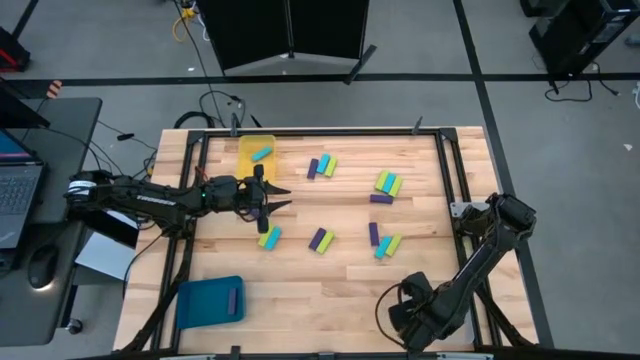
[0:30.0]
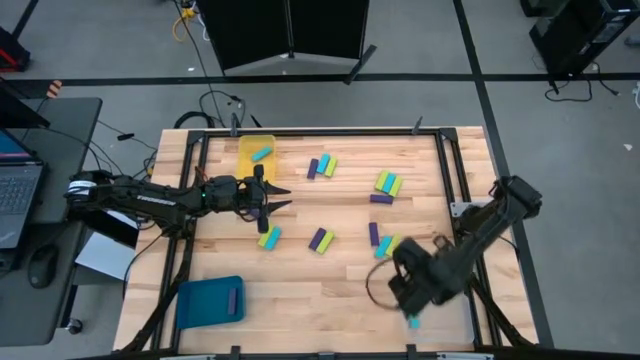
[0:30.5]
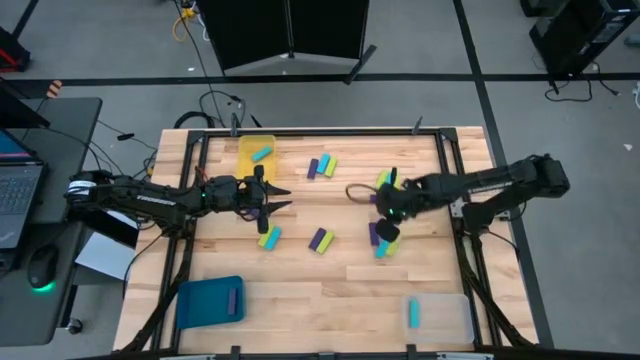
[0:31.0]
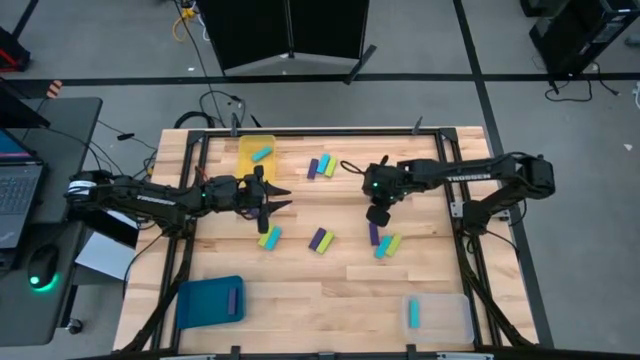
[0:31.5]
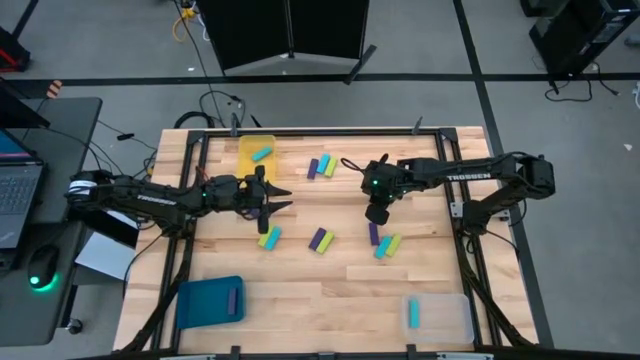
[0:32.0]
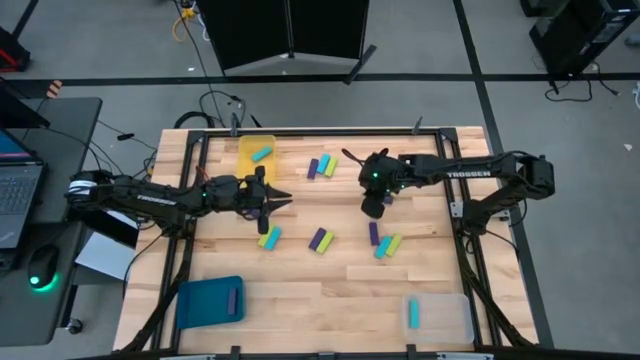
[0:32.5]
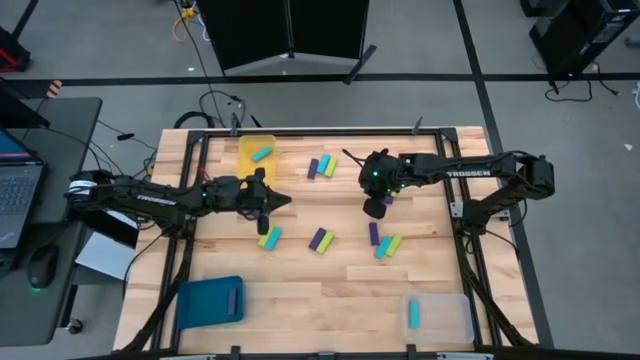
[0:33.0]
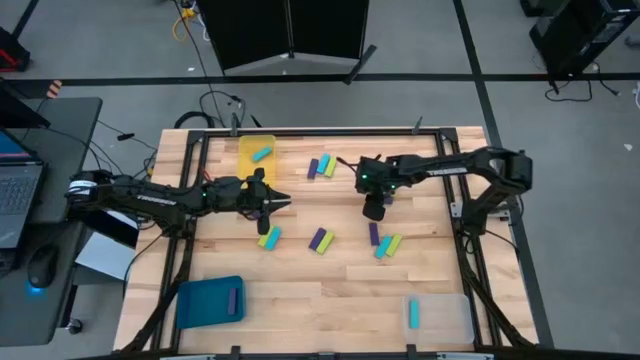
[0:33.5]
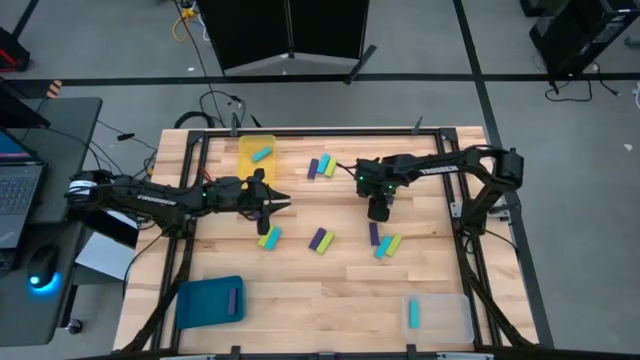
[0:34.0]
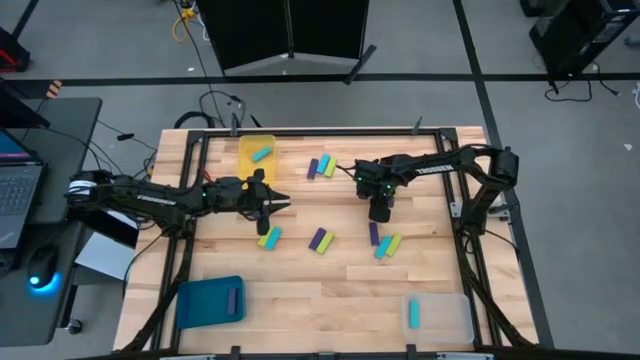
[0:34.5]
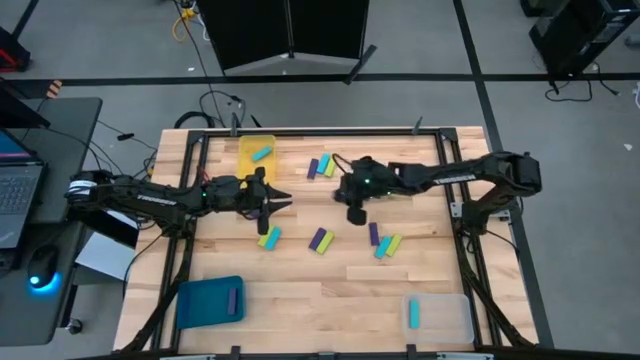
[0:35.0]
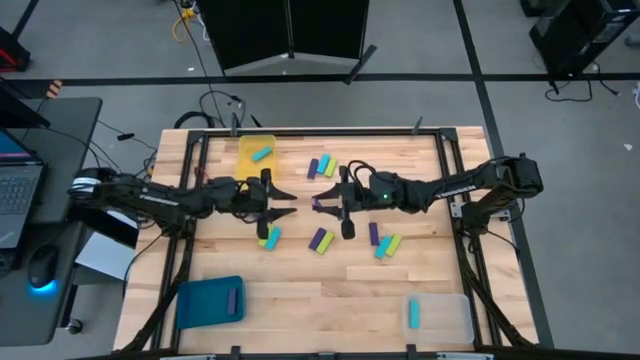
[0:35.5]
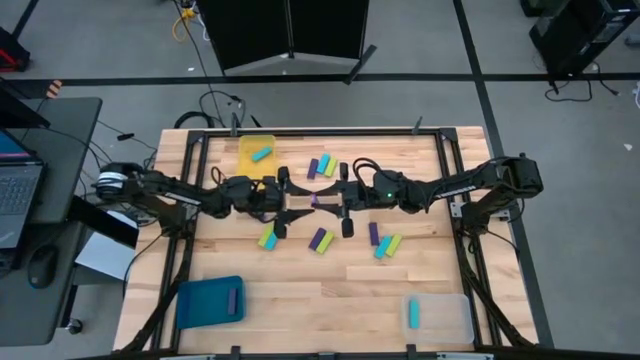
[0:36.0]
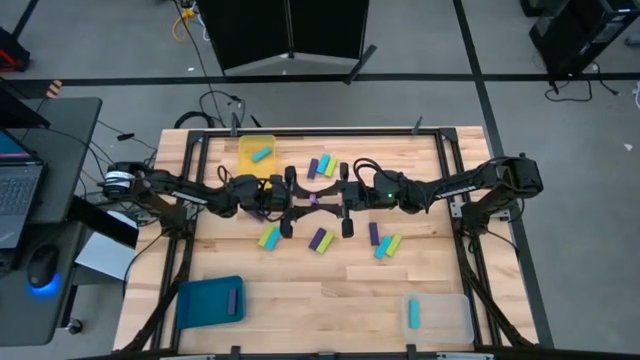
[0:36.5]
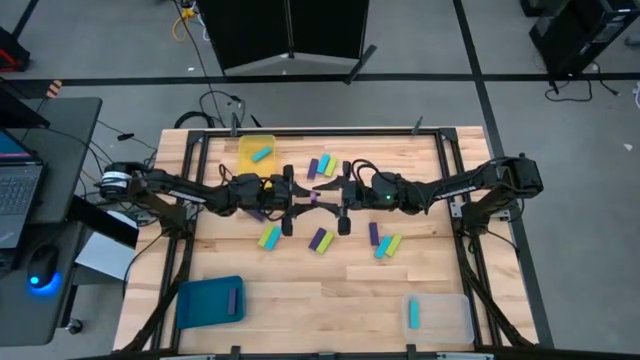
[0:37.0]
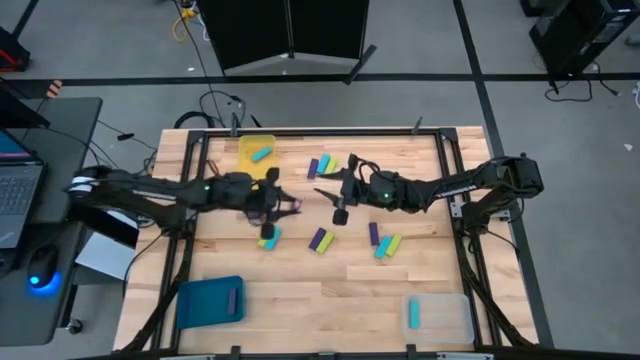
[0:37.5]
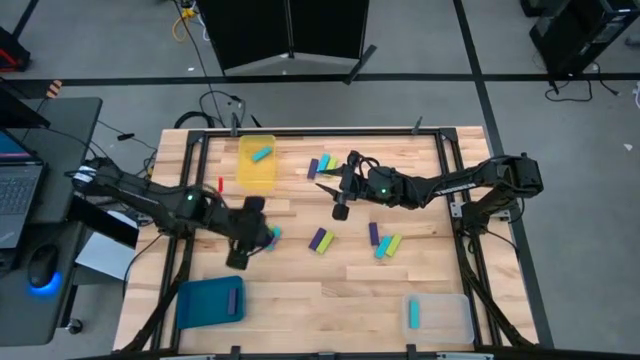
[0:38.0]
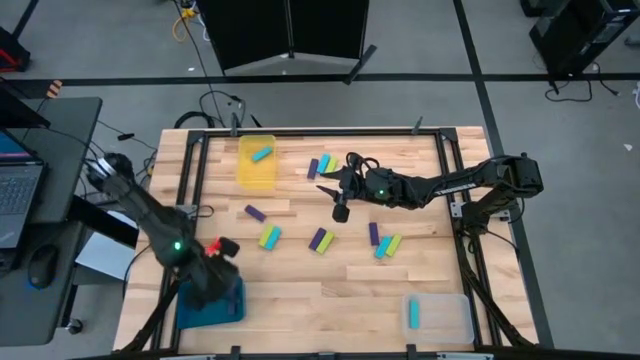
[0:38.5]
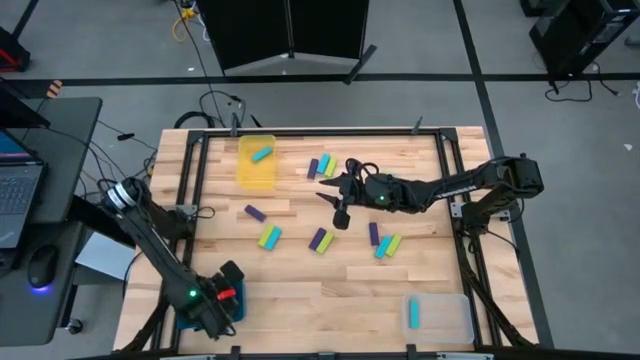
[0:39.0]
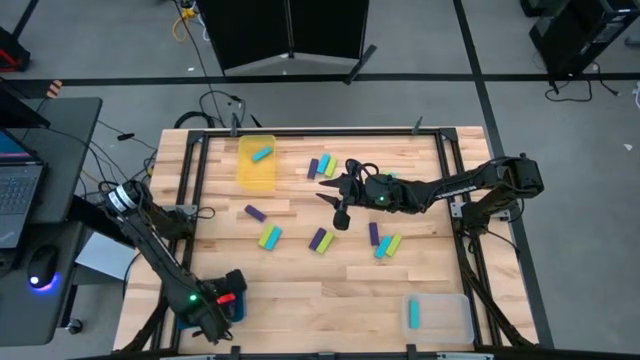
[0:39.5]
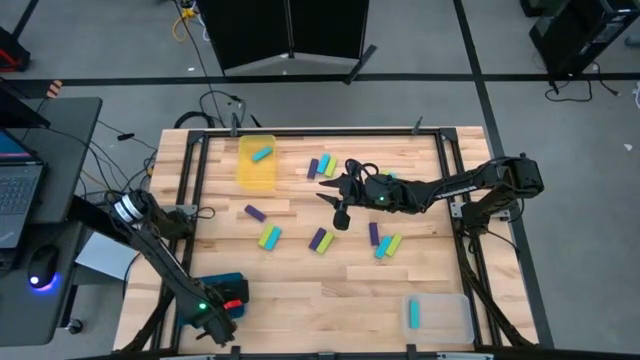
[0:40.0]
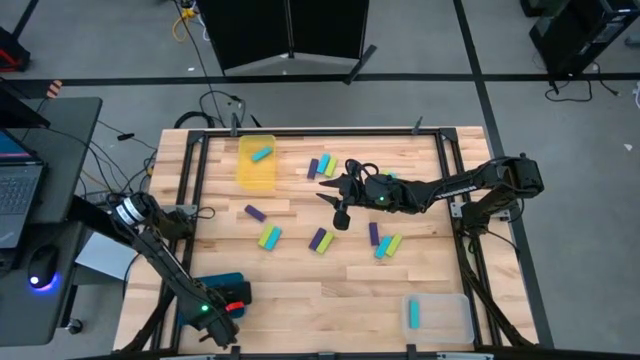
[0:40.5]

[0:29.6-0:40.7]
Task: Sort blocks
Put the purple block into the blue bin

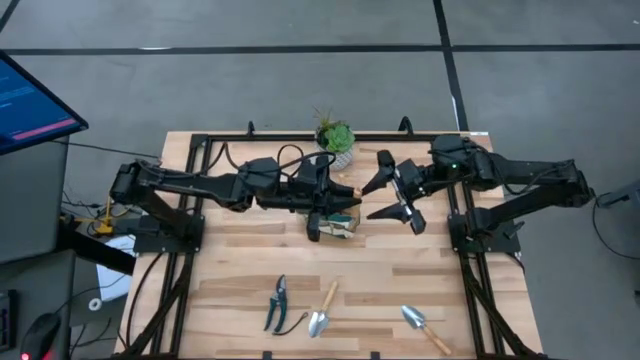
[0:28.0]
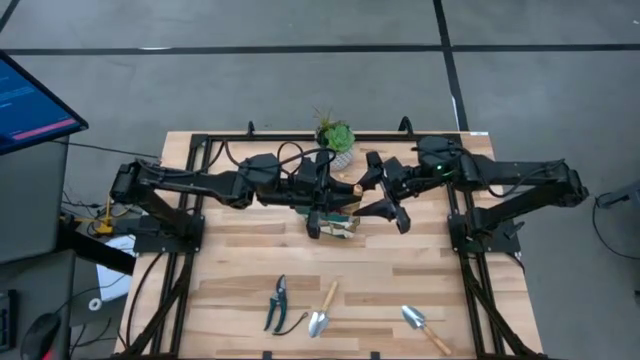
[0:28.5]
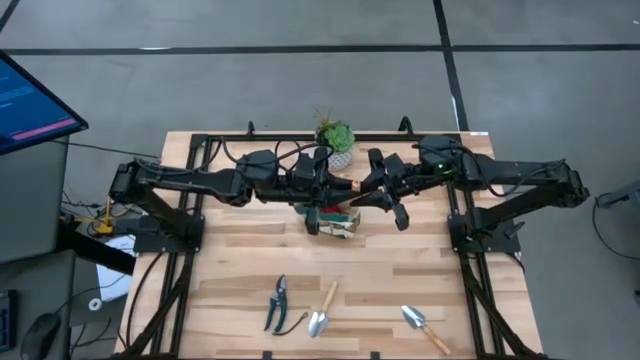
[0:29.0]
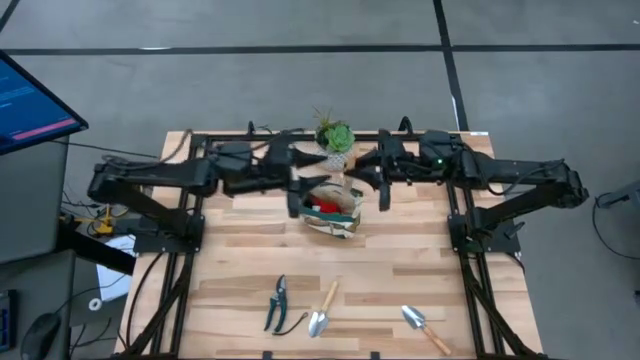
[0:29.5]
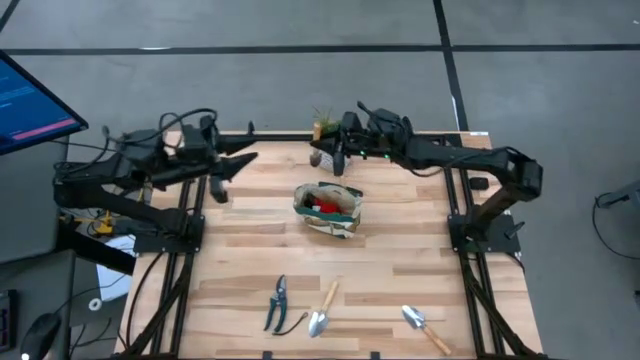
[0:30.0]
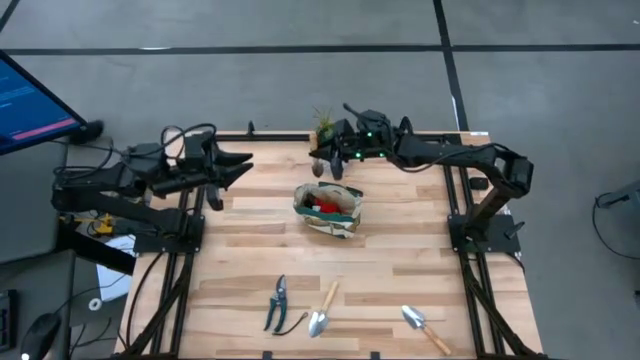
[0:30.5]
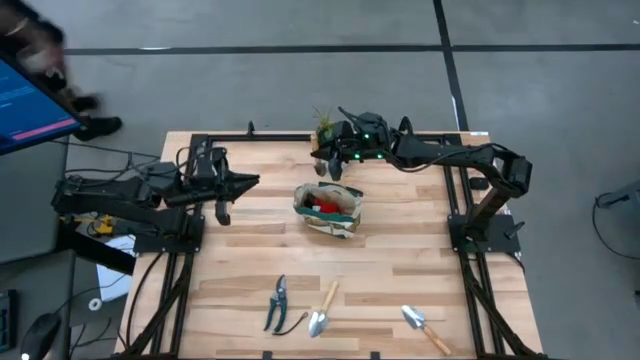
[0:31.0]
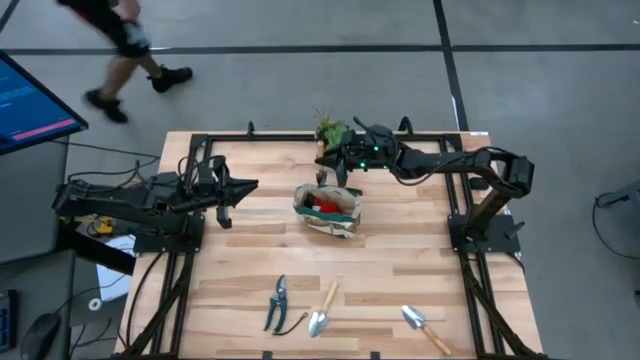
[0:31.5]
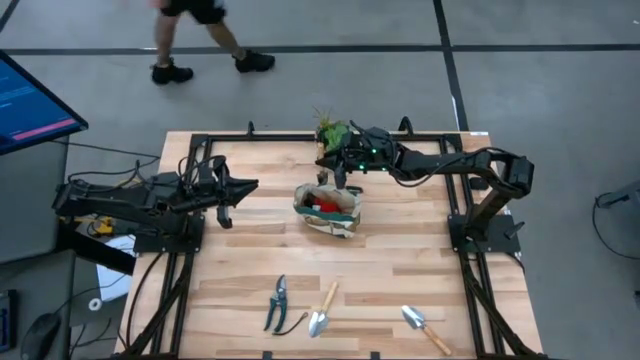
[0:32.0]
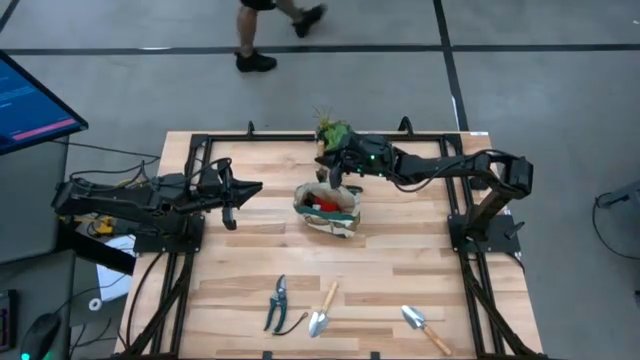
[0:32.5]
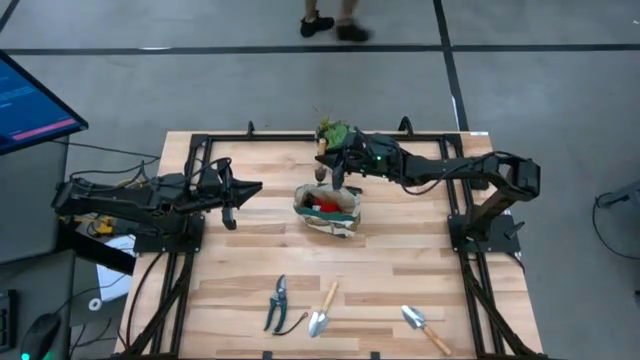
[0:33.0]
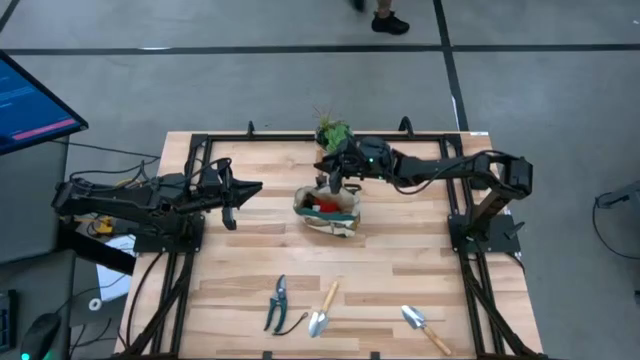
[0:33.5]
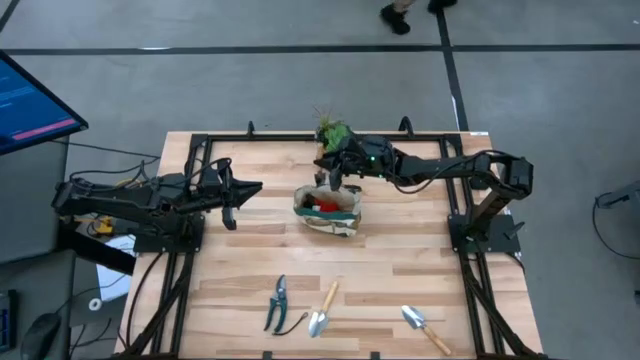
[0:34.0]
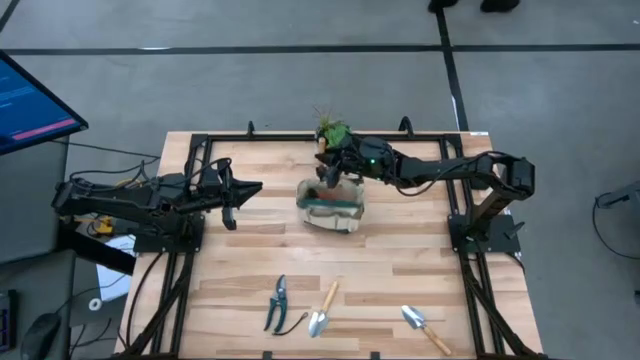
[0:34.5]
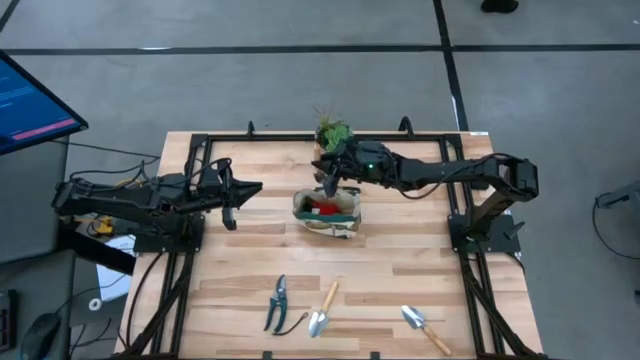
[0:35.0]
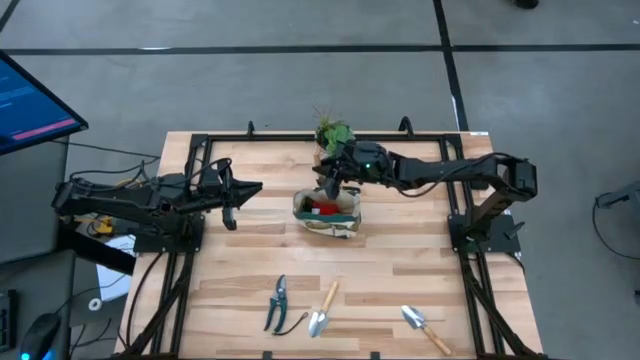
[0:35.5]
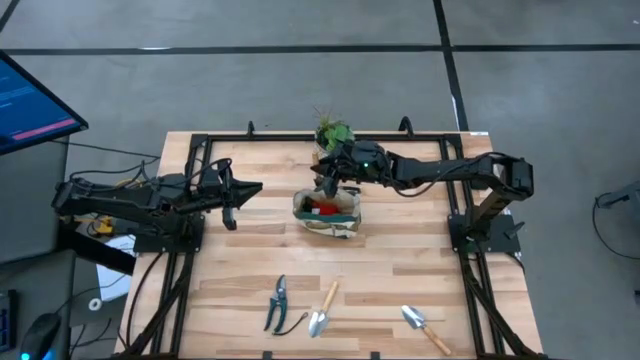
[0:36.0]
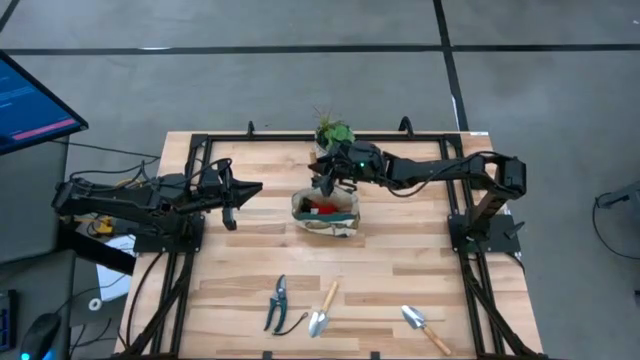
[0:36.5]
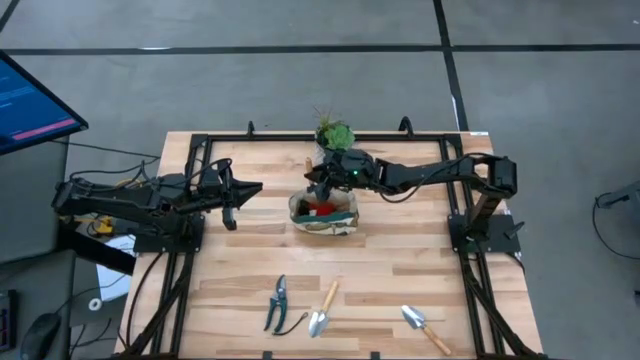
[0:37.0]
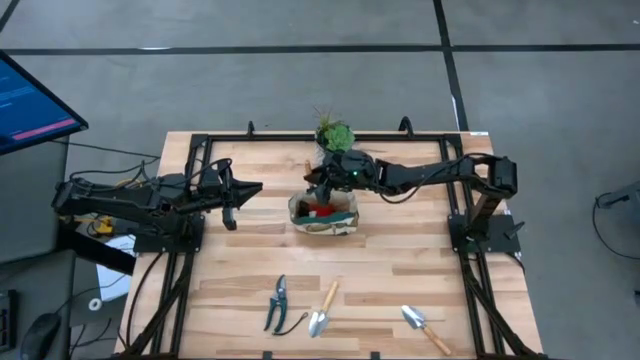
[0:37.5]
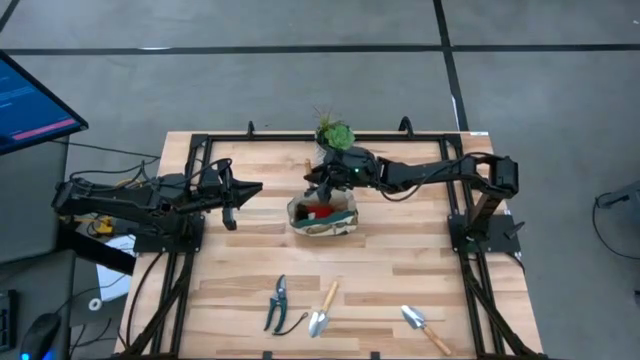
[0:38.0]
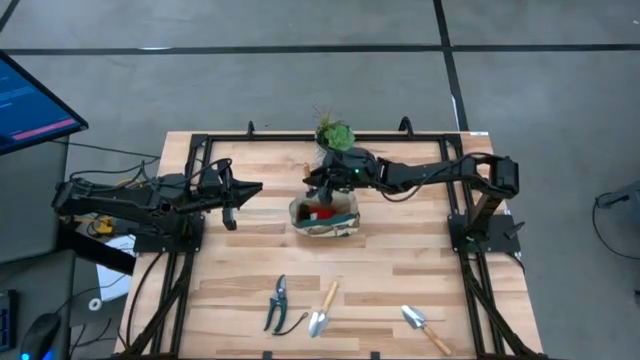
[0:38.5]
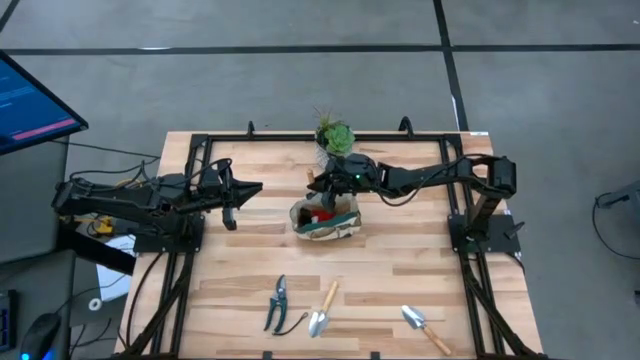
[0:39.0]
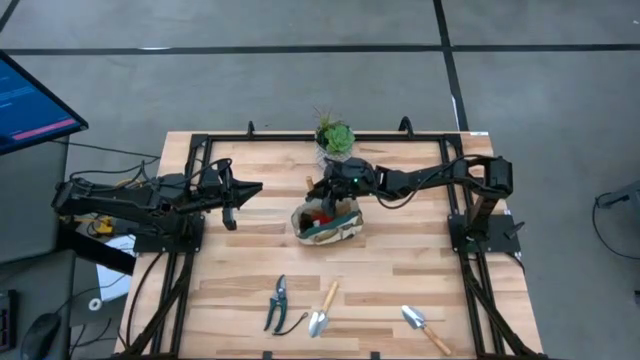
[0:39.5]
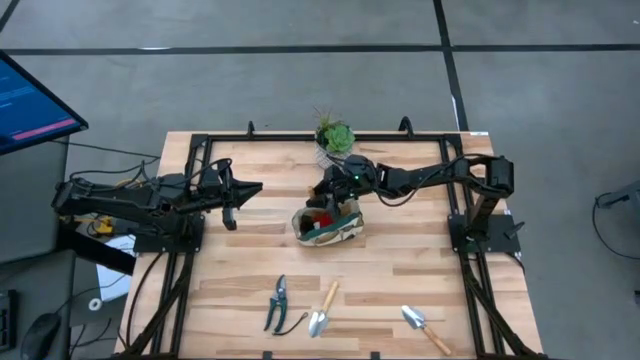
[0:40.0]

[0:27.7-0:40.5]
Task: Pick & Place Garden tools in Gardening bag
Put the trowel into the gardening bag
